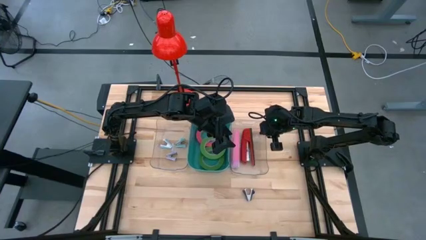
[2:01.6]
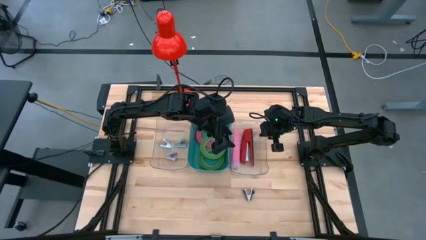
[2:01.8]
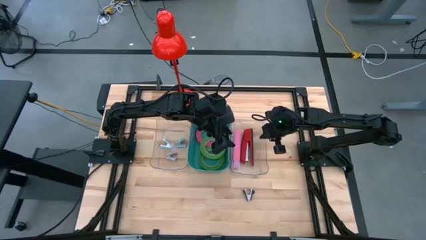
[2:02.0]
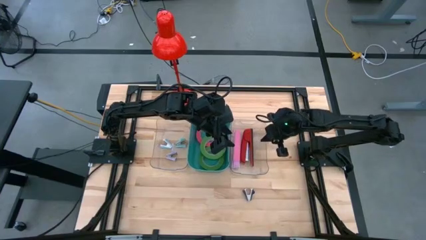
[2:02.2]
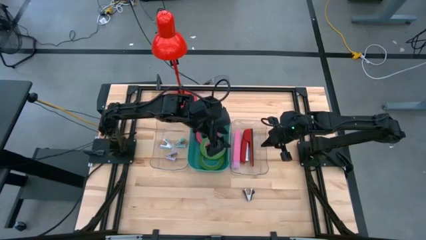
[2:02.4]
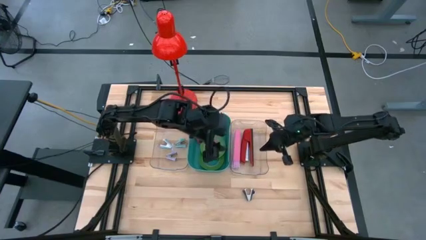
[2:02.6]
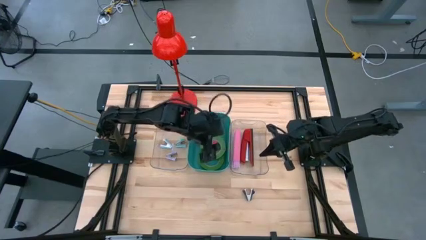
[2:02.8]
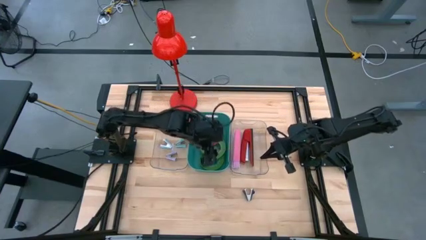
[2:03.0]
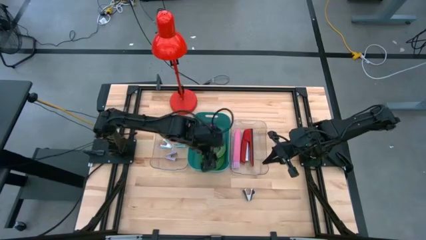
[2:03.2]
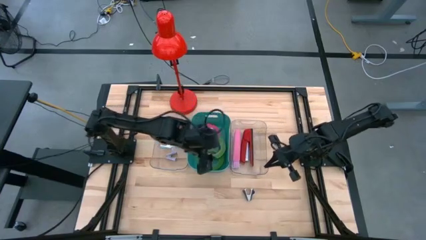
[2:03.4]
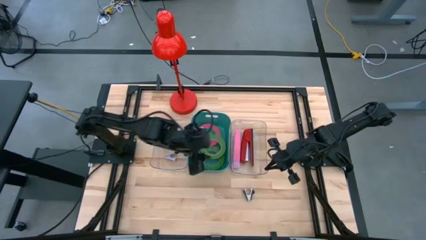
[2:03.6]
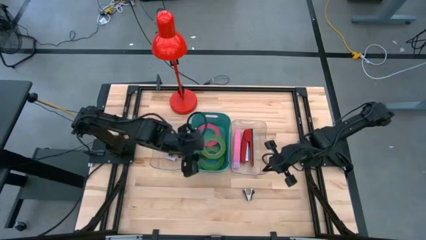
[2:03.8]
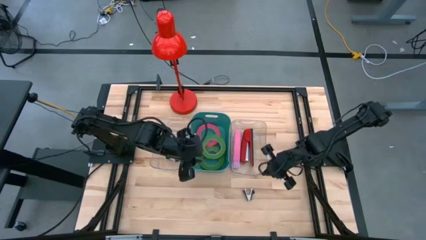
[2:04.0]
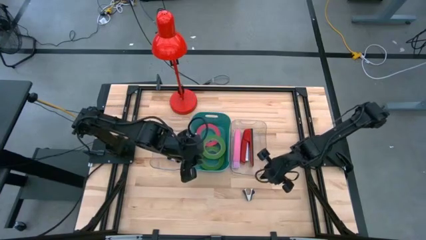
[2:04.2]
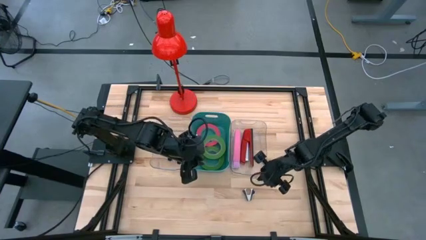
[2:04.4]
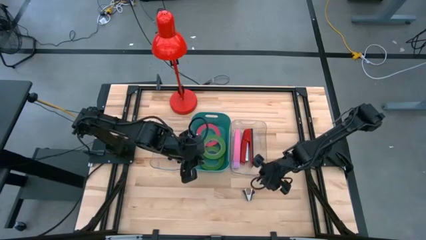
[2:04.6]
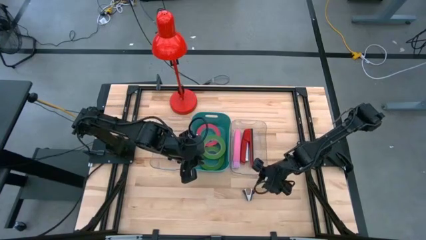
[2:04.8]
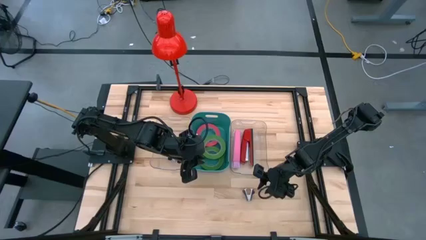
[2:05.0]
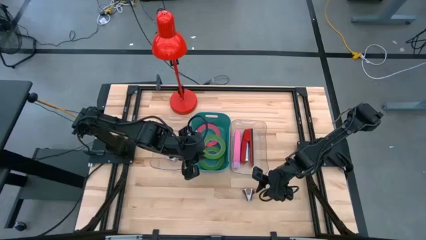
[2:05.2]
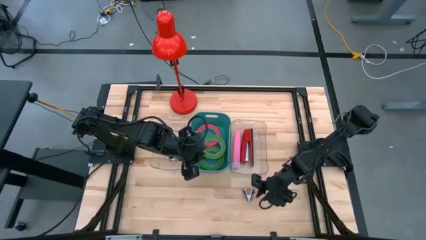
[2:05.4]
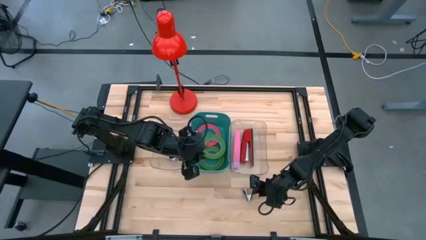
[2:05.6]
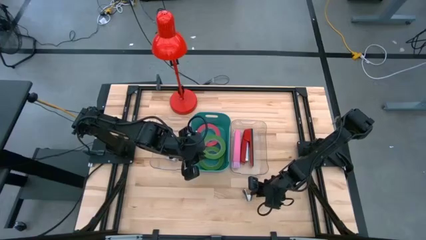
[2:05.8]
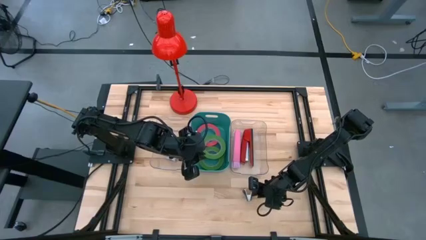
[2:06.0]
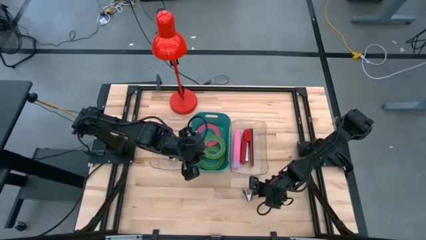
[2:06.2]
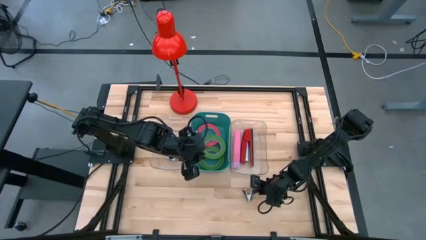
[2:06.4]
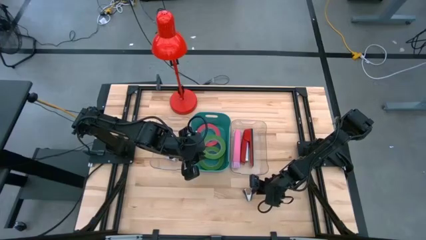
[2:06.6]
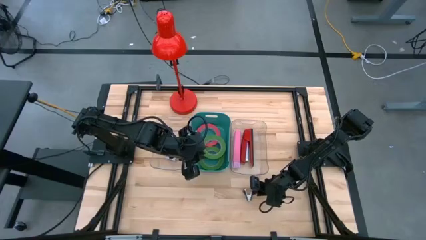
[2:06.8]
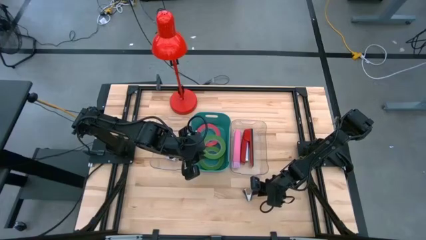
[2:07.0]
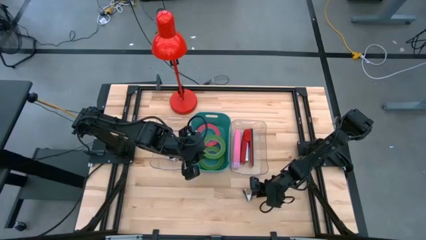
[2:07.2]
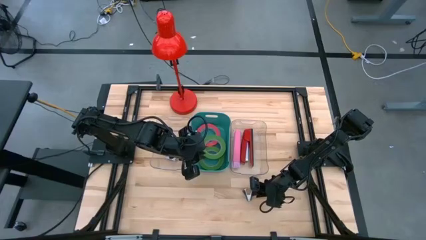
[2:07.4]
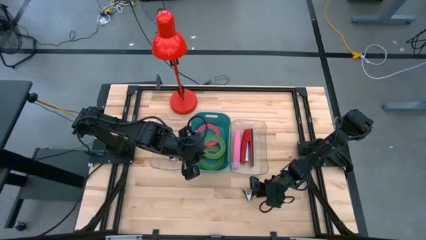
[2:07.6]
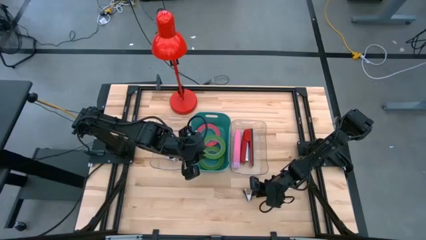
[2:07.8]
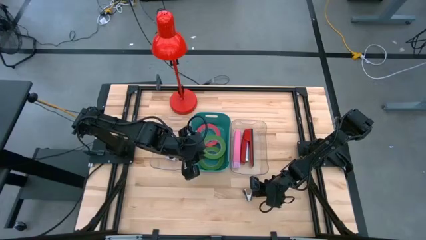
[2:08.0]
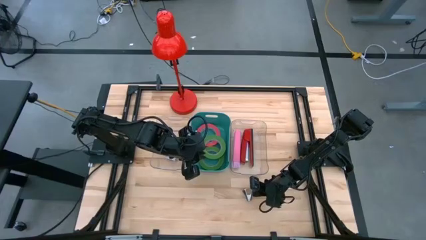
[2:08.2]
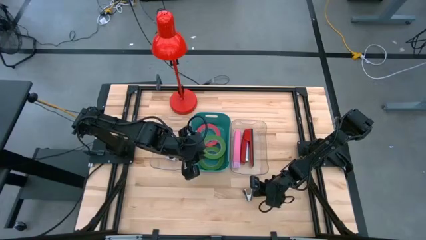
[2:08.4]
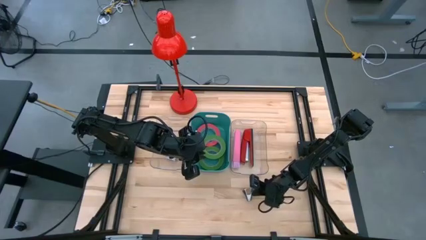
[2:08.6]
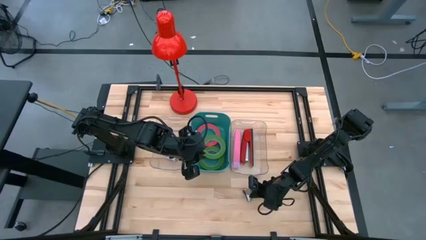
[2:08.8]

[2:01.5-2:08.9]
Task: Pick and place Stapler, Stapler remover, tape
Put the black stapler remover into the left transparent bin

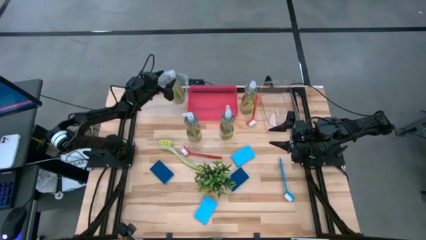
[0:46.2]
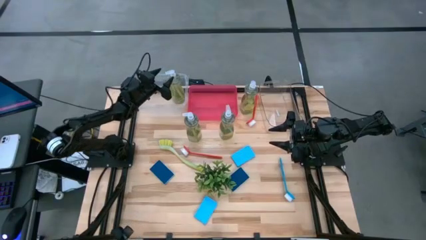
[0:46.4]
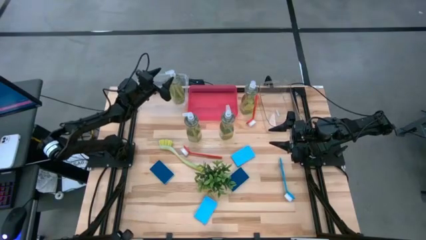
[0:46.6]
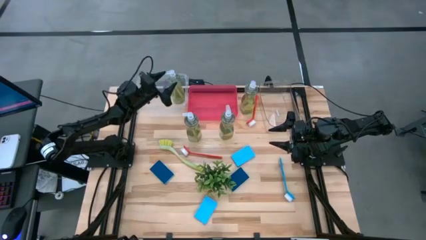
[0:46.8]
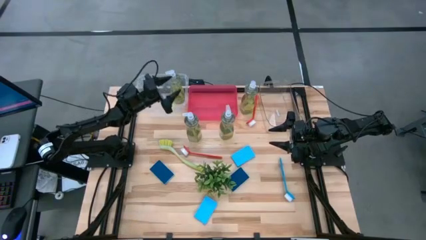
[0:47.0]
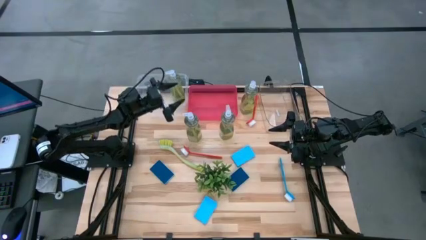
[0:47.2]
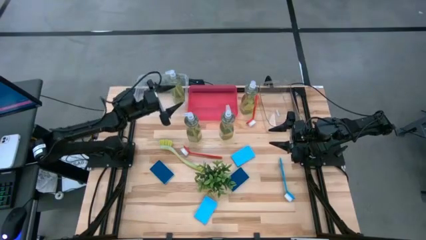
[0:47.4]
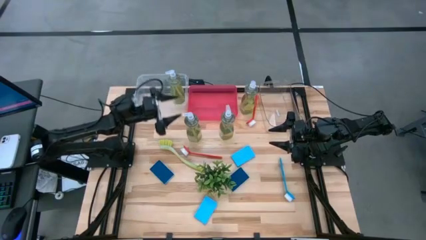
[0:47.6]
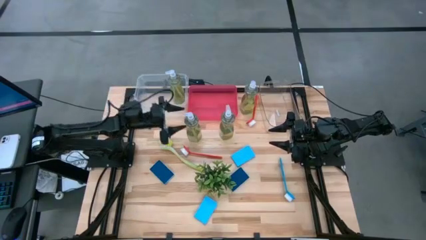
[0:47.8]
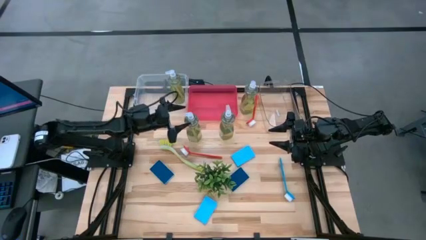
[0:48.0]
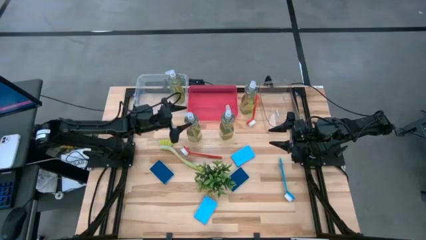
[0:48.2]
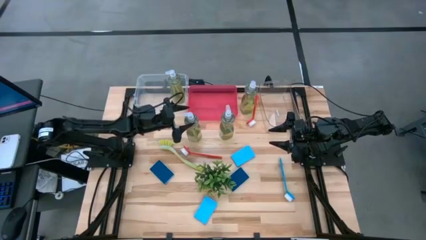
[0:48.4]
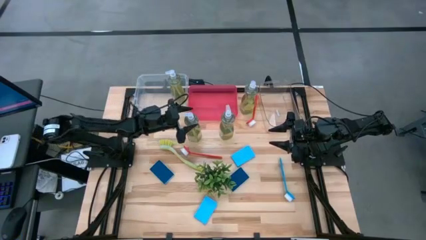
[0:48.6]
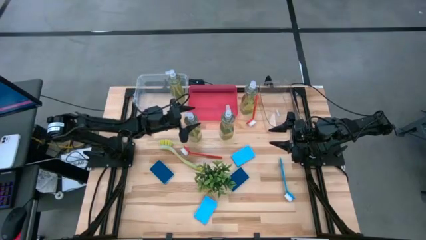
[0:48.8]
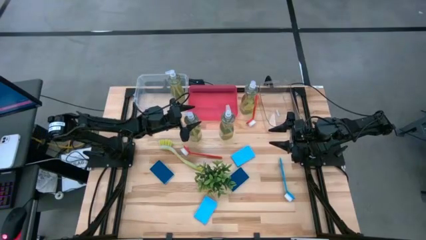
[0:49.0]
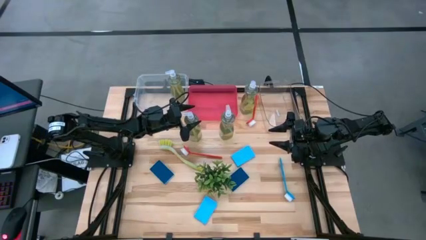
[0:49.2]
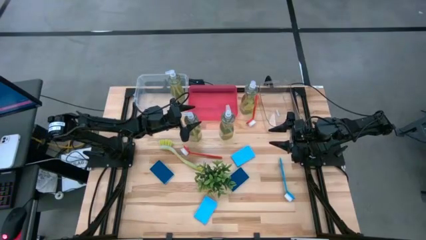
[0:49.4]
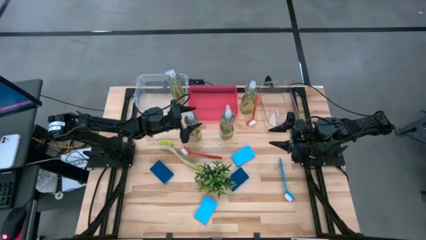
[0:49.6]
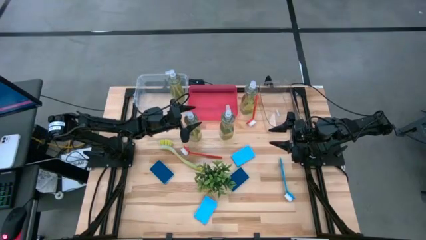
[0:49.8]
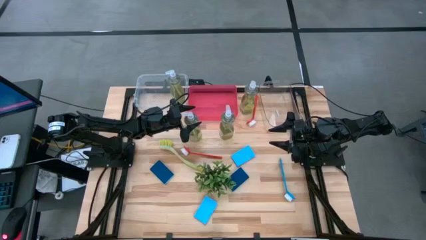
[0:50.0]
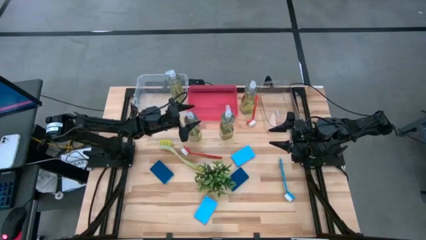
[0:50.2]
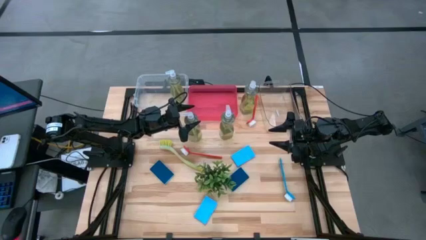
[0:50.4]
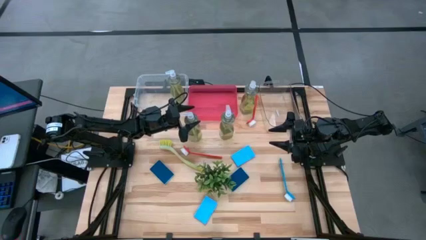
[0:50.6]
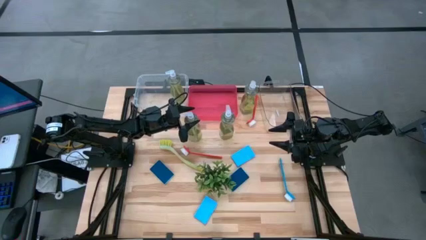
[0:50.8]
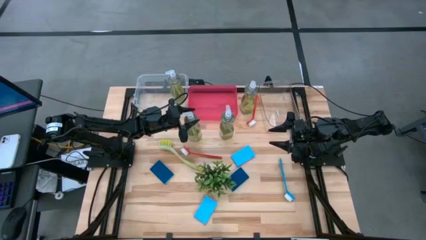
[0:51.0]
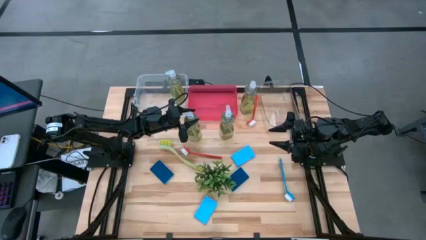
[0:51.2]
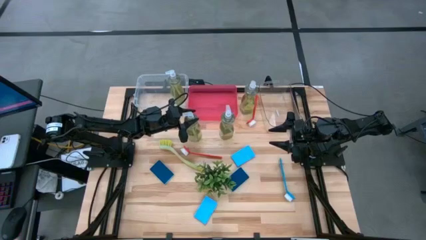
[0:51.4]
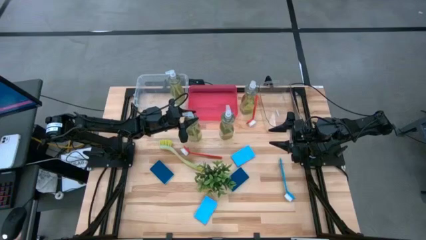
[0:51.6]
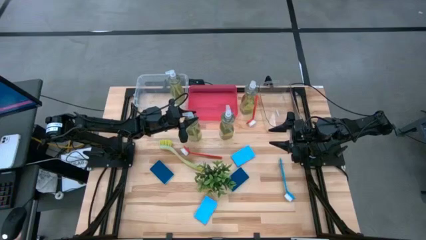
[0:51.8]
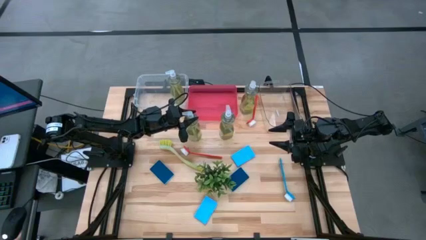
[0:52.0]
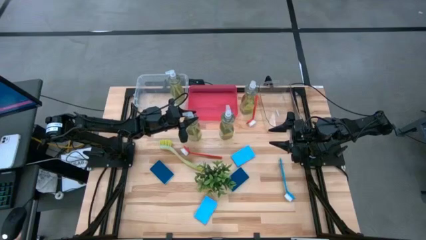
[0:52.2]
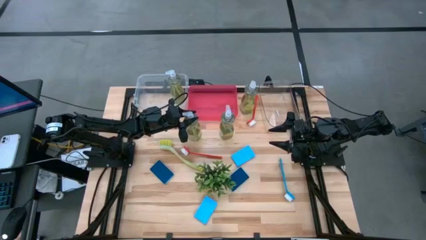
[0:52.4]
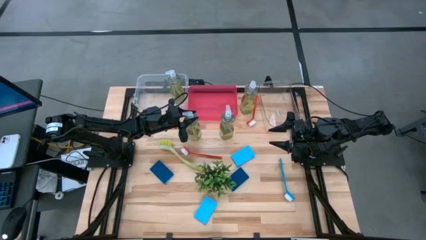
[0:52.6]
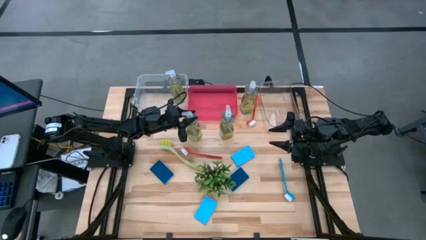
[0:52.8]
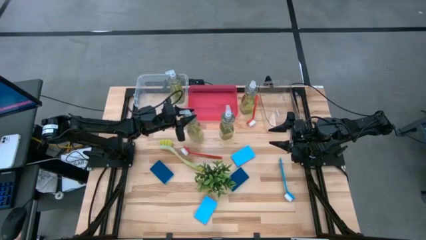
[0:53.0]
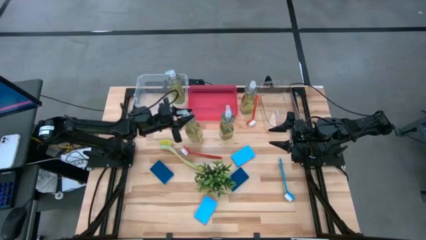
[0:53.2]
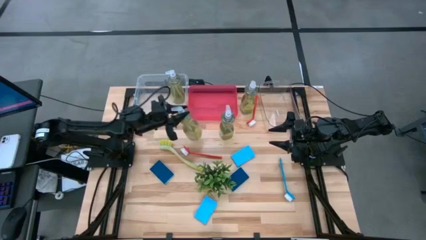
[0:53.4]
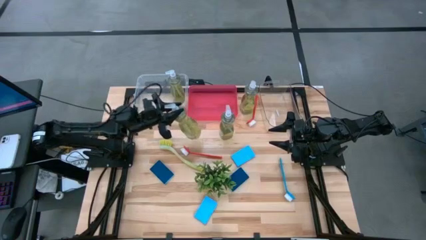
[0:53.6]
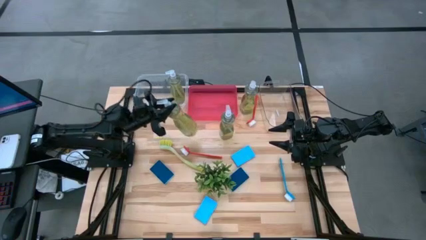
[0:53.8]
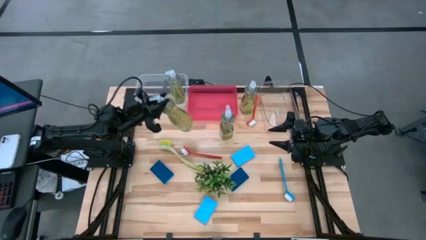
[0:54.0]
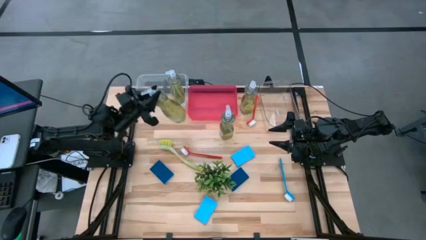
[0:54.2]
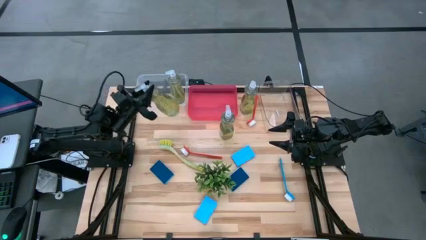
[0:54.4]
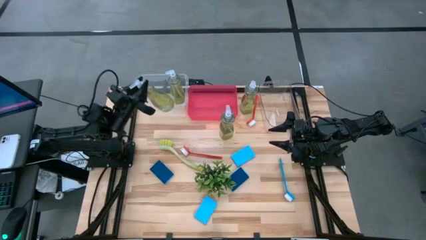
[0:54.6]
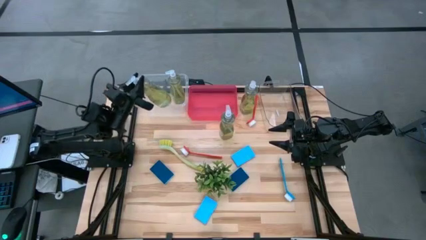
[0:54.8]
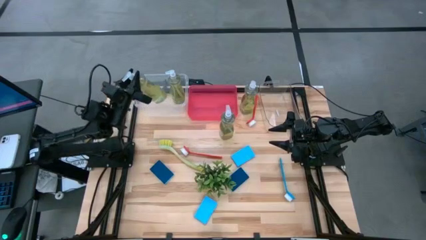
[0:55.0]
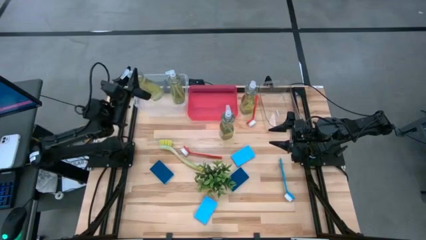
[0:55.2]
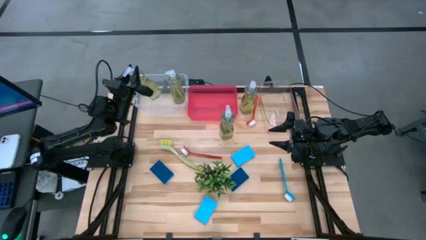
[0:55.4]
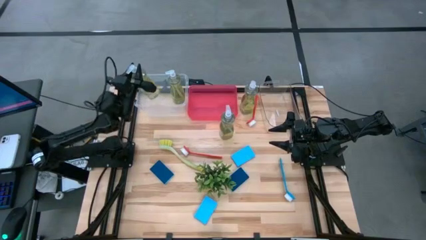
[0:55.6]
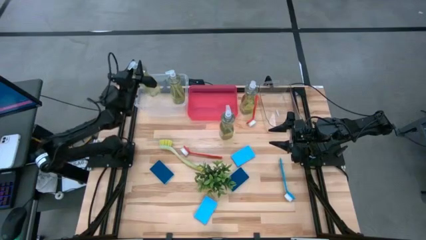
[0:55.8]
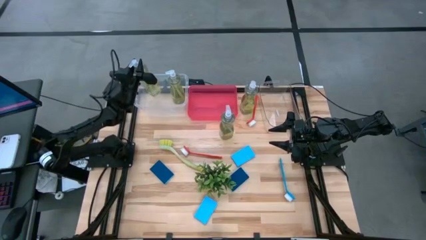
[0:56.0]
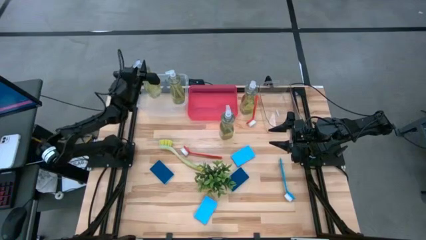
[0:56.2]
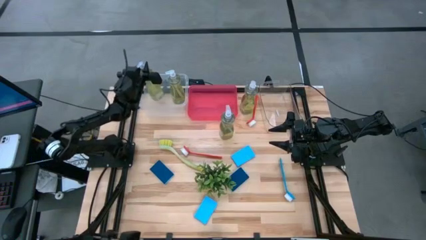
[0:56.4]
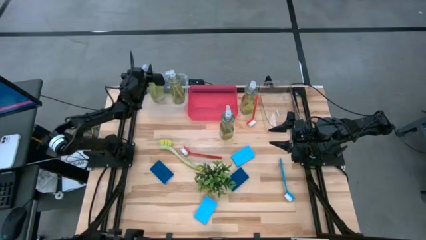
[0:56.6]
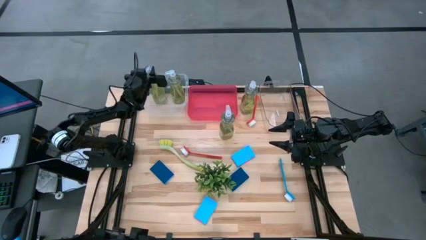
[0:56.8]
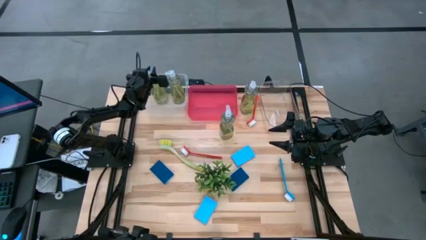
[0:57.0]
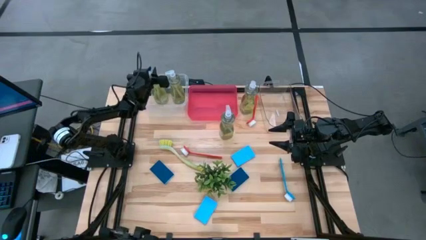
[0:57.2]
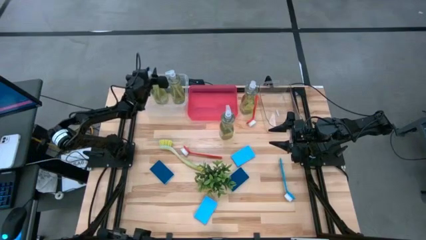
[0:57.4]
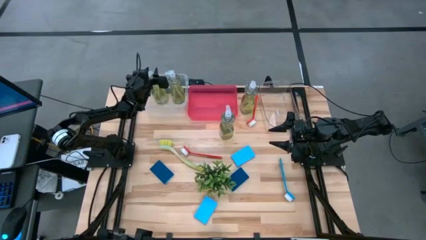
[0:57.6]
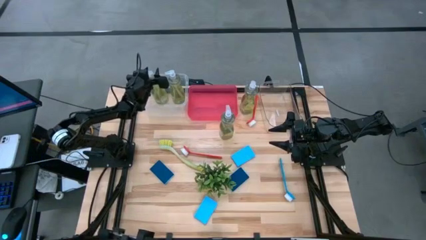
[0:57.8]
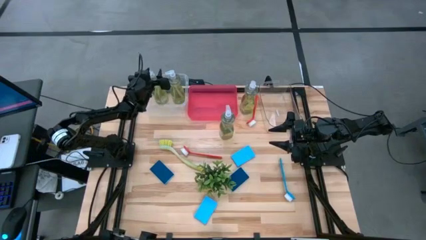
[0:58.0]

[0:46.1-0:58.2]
Task: Pick & Place Kitchen Sink Supplies
Put the yellow dishwashing liquid into the white bin
